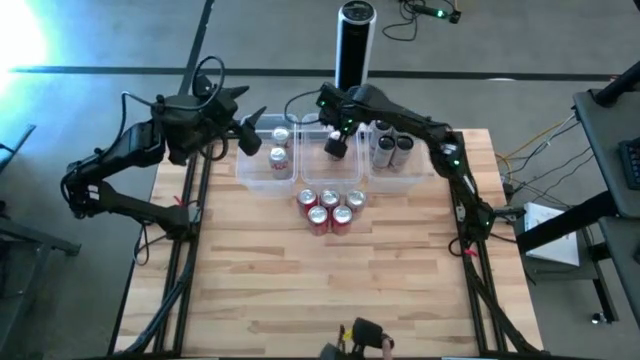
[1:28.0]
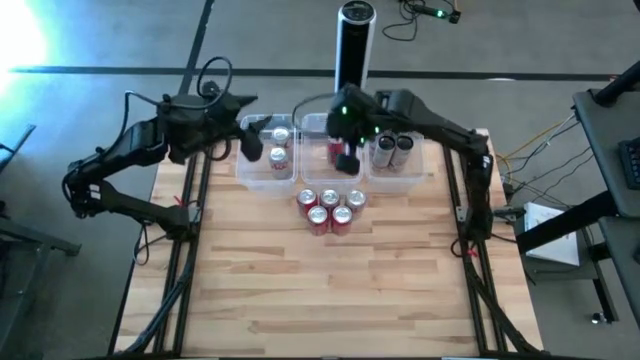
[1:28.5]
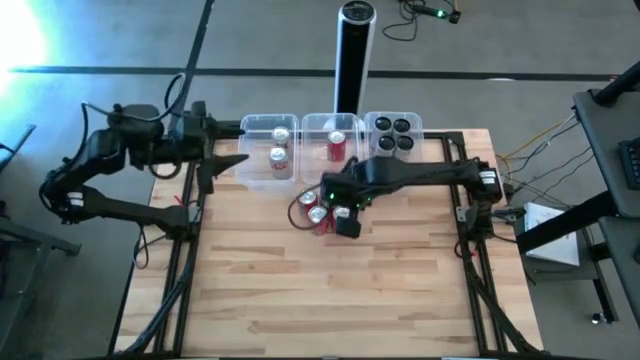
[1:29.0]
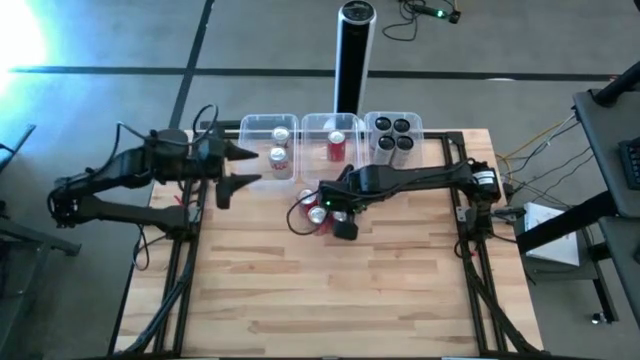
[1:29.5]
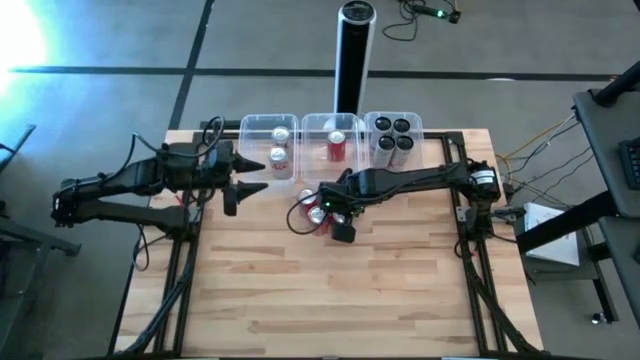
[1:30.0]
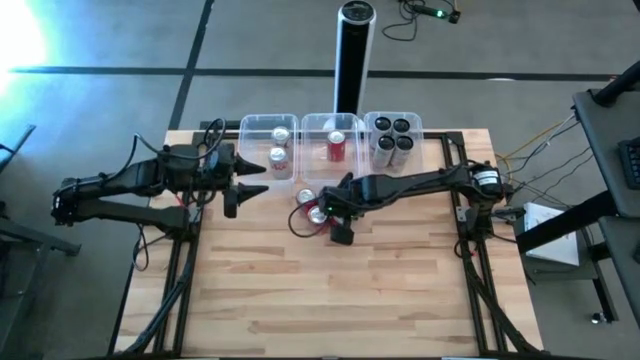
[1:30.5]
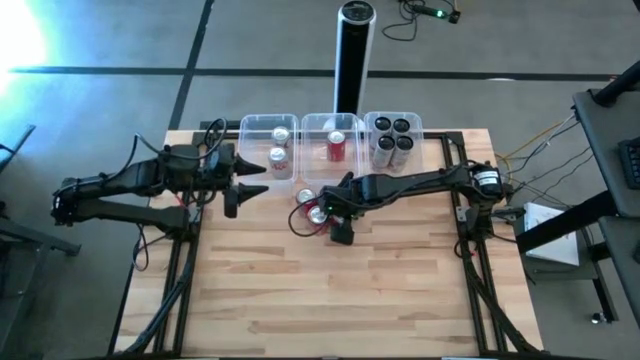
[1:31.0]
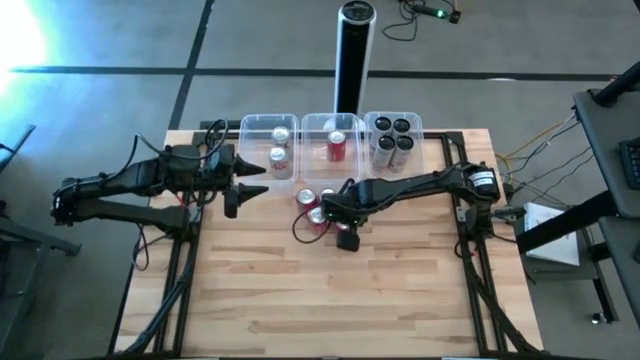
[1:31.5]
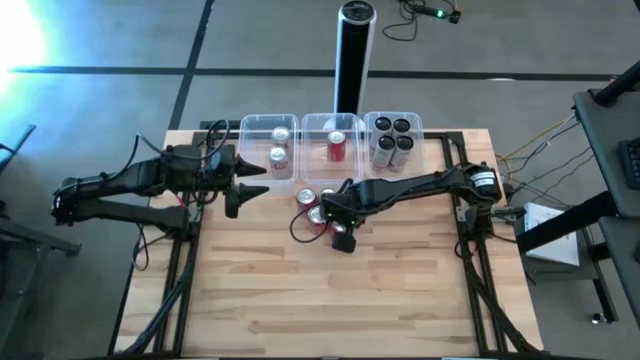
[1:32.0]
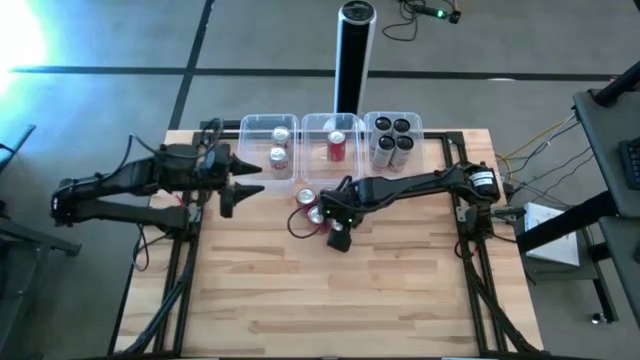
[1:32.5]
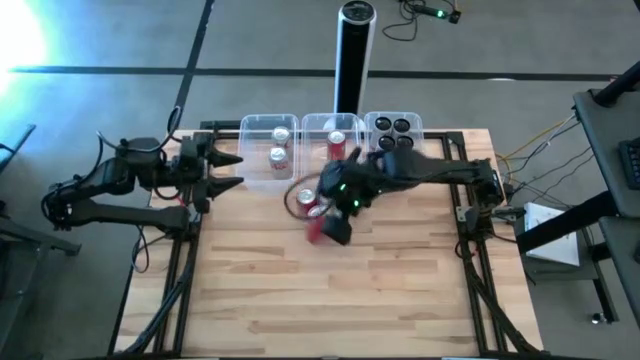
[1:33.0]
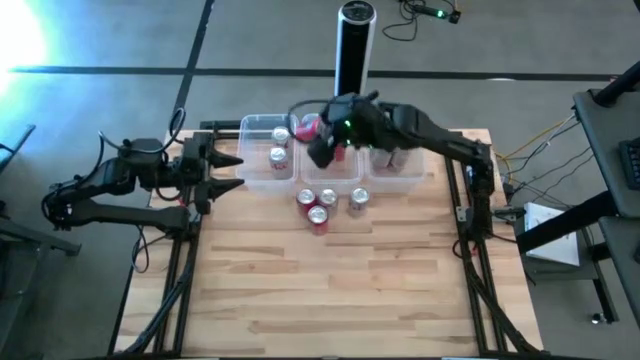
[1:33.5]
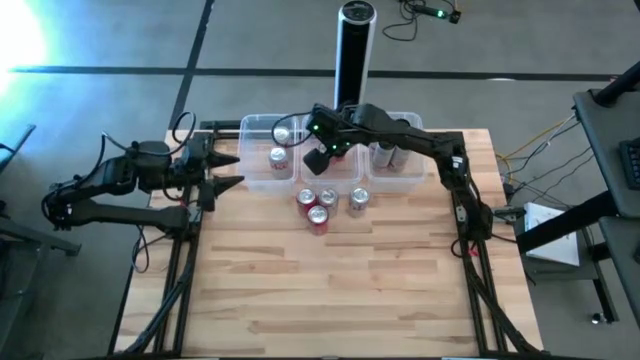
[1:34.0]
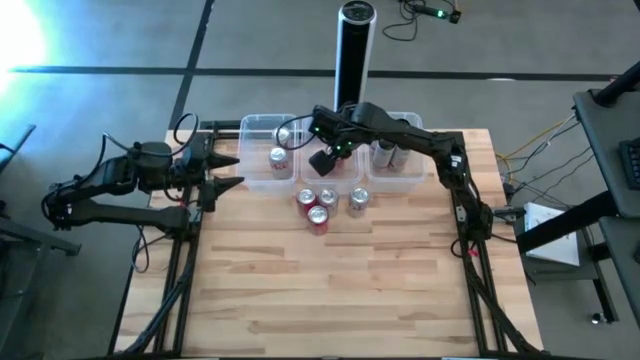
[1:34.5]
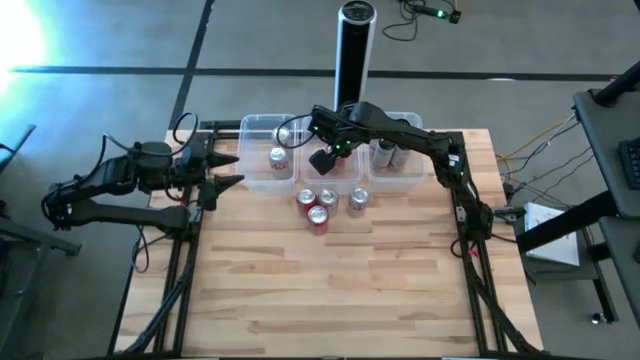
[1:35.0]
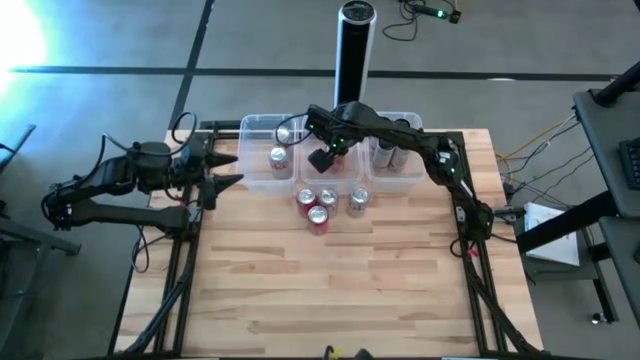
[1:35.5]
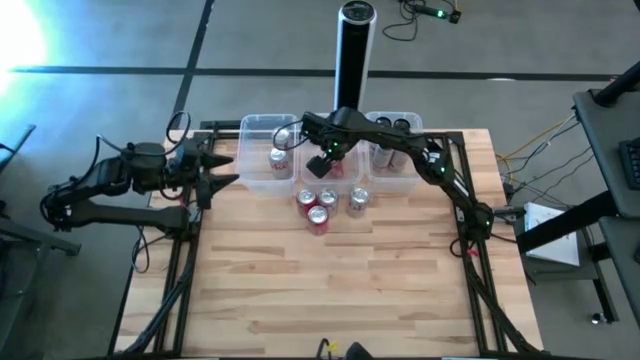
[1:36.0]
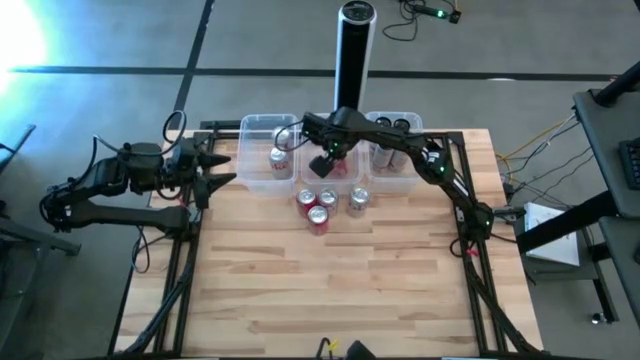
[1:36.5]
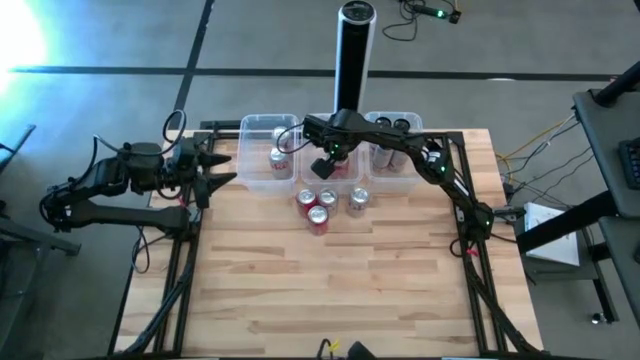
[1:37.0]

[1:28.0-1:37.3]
Task: Sort soda cans
Put the bottom right orange soda can into the center transparent bin

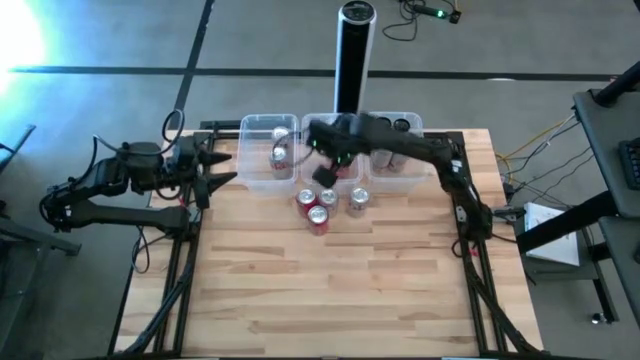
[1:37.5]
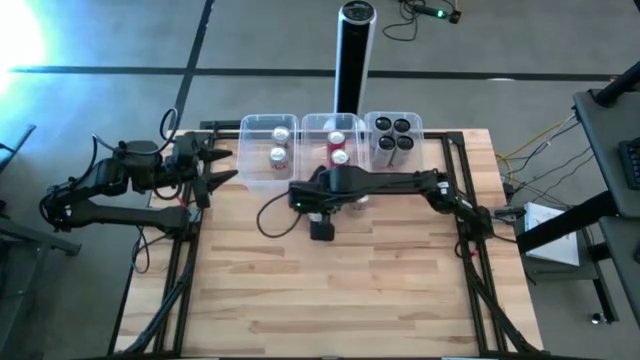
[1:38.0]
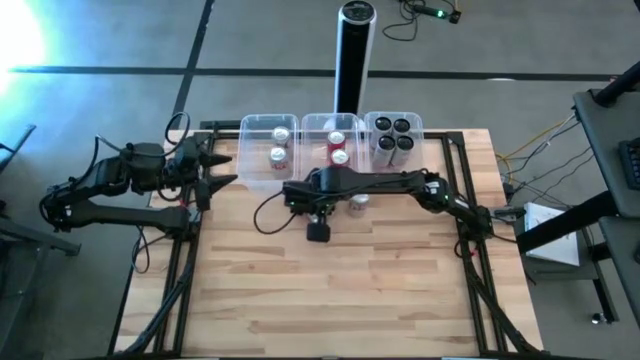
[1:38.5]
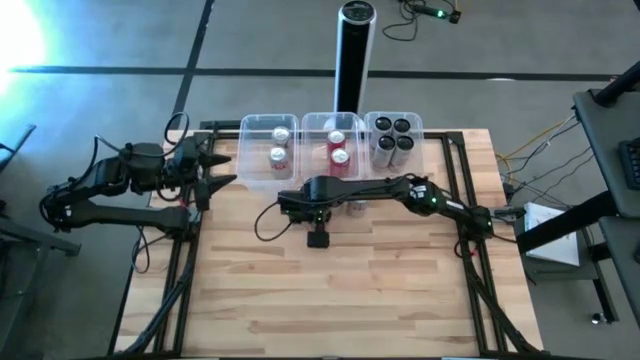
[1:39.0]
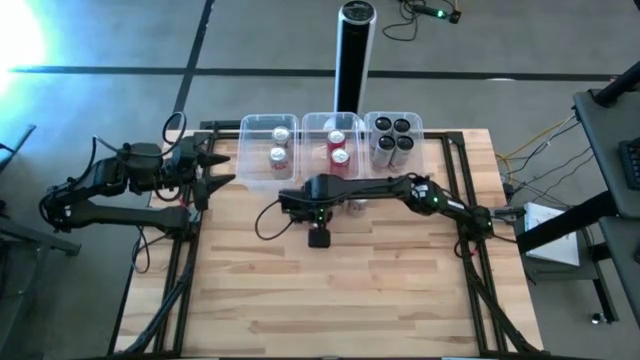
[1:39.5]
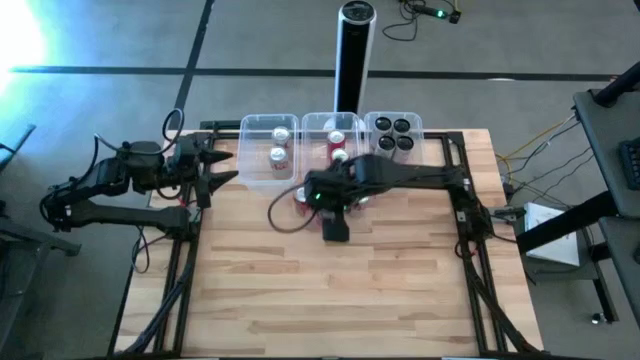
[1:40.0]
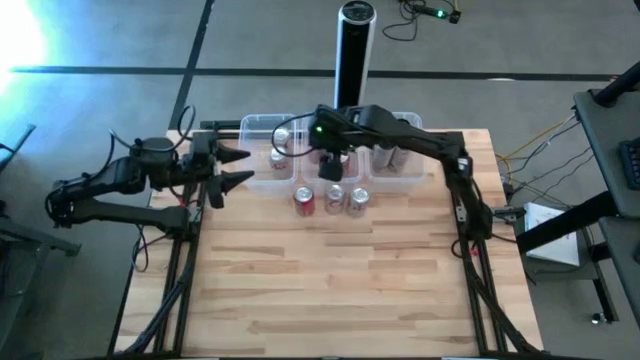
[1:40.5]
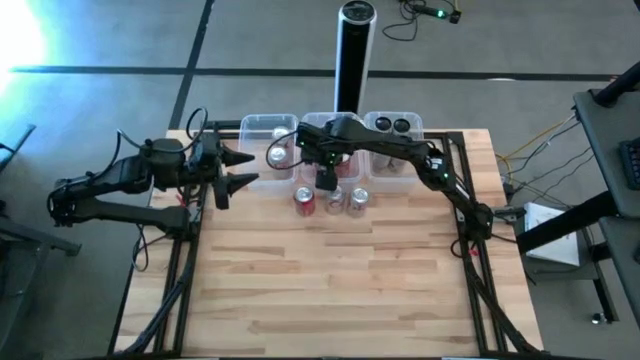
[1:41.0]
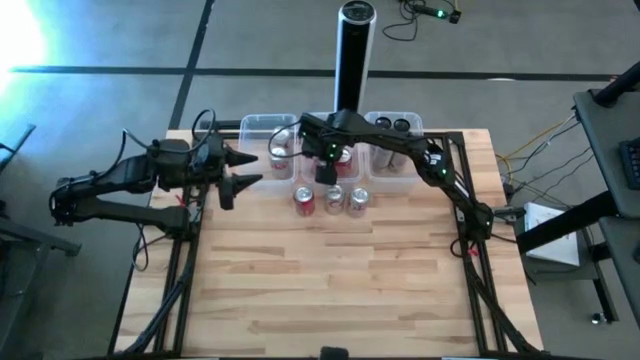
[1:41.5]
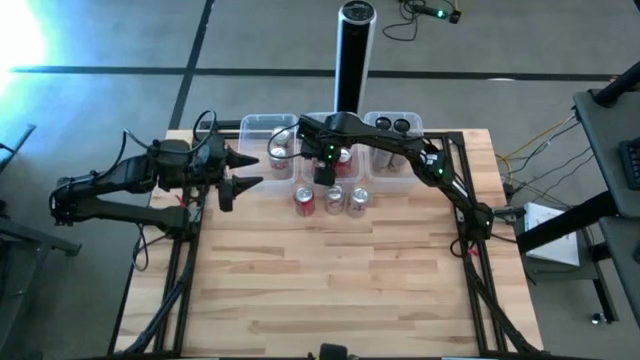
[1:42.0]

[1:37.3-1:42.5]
Put the bottom orange soda can into the center transparent bin

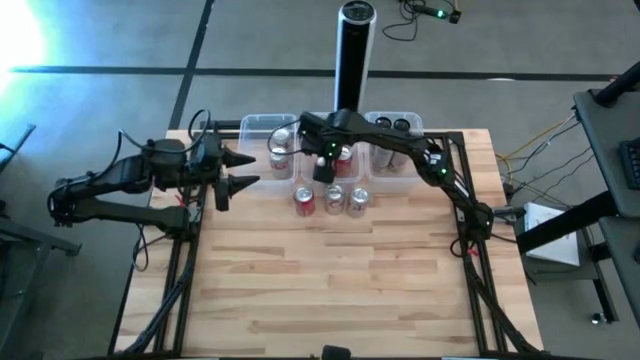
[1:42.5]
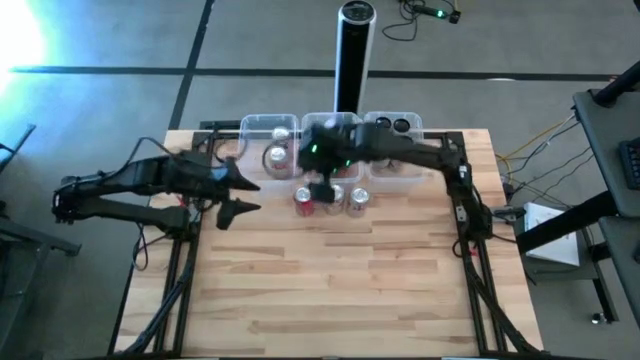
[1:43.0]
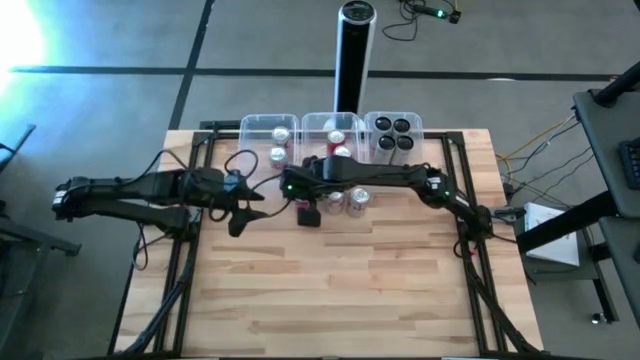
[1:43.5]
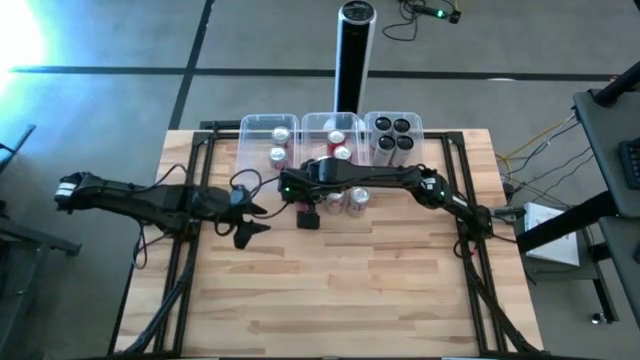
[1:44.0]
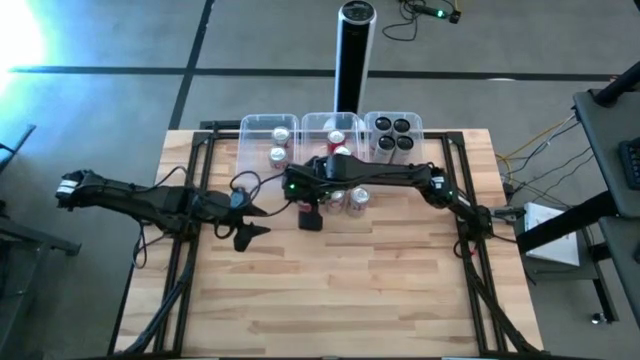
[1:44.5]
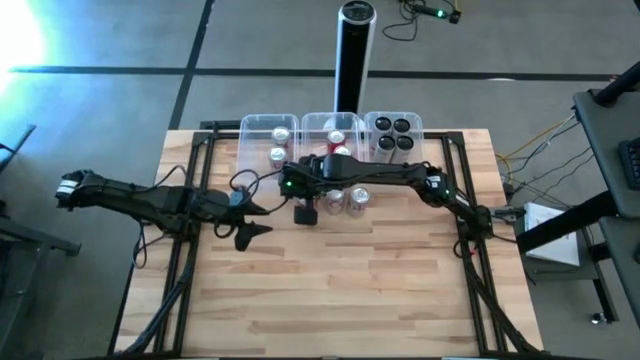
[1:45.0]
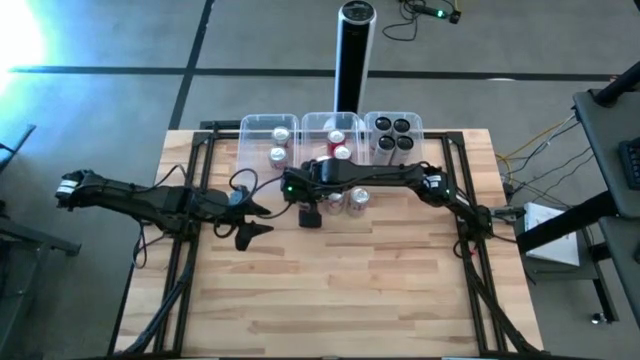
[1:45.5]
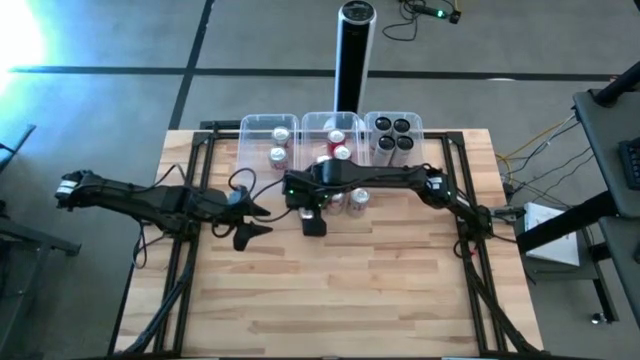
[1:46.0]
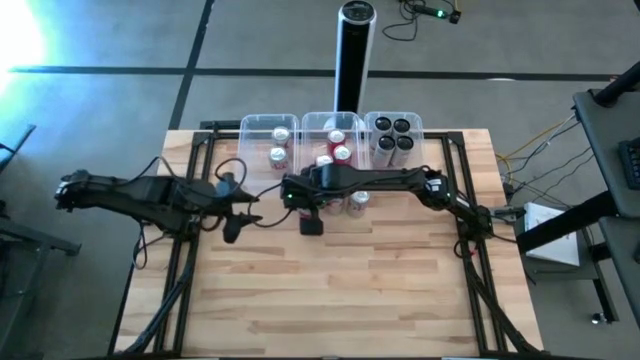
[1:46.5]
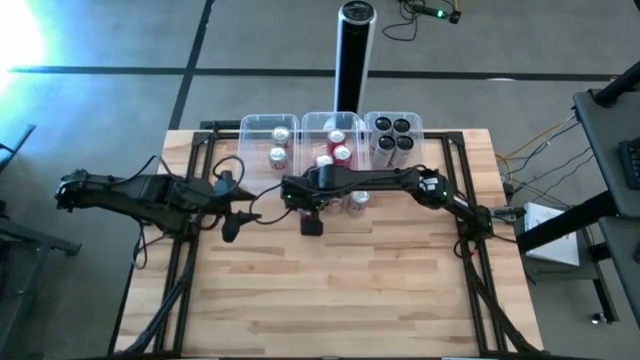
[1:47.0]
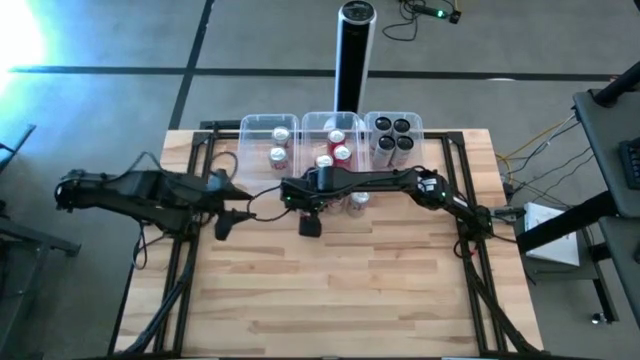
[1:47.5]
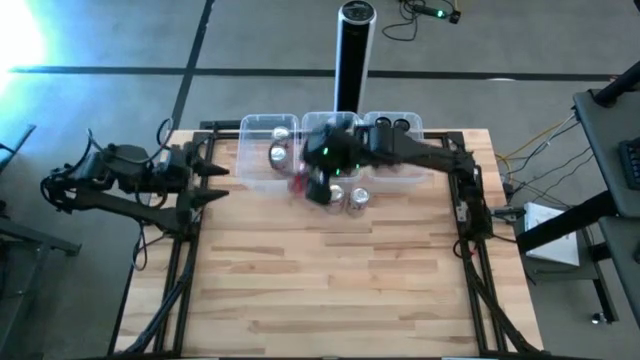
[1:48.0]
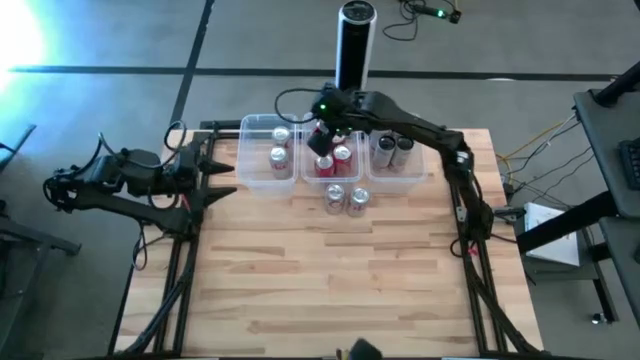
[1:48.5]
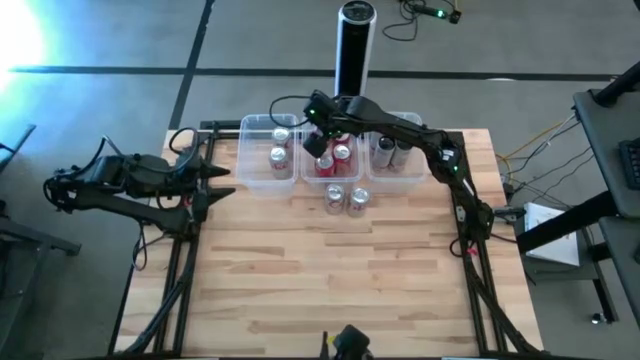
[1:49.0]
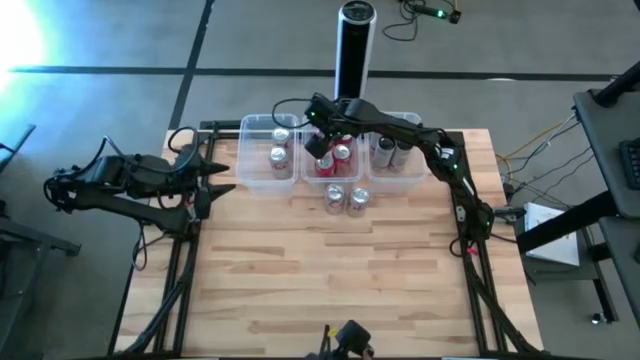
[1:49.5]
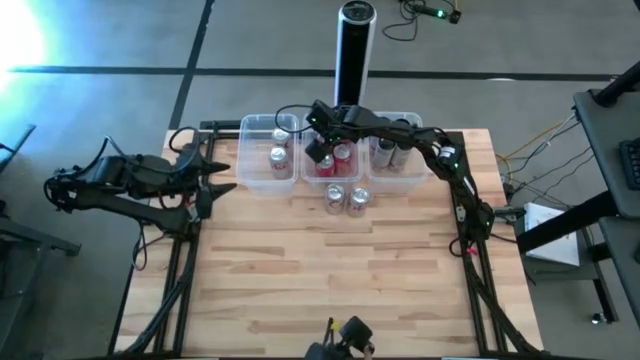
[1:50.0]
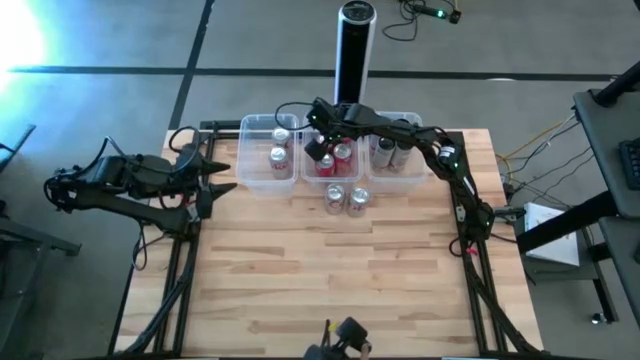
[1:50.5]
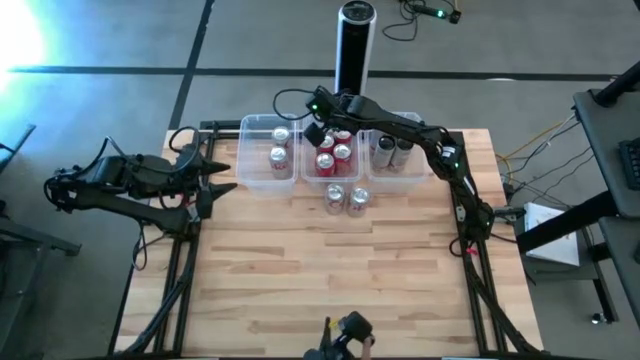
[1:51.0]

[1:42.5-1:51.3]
Put the orange soda can into the center transparent bin
